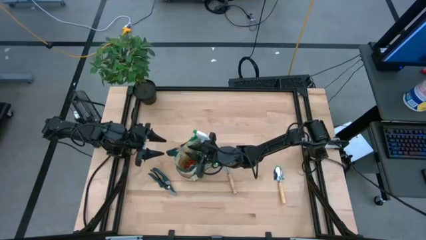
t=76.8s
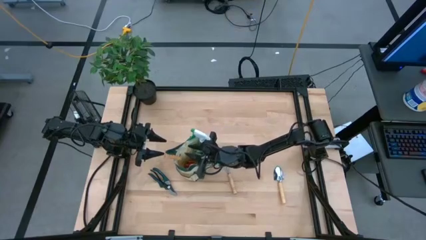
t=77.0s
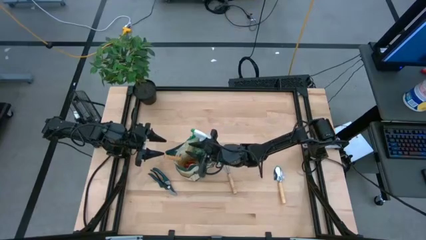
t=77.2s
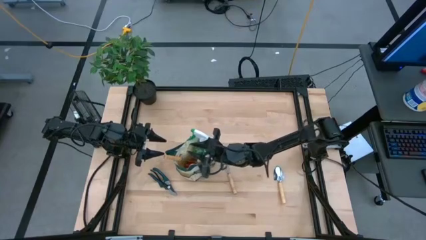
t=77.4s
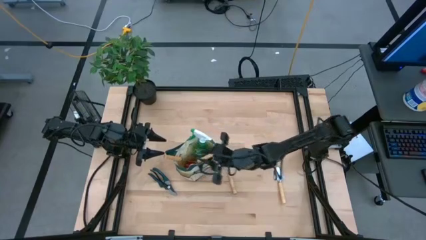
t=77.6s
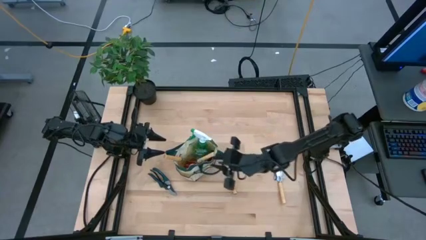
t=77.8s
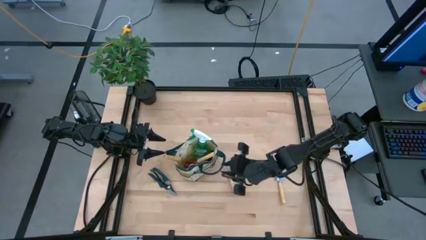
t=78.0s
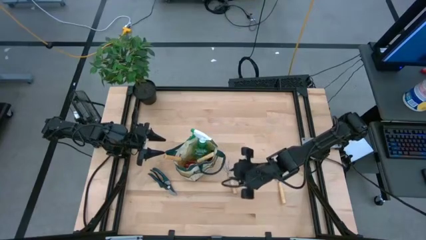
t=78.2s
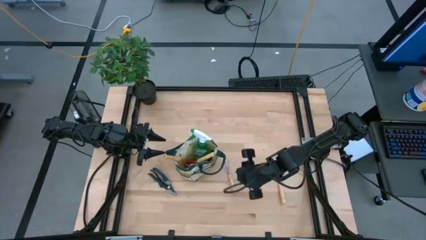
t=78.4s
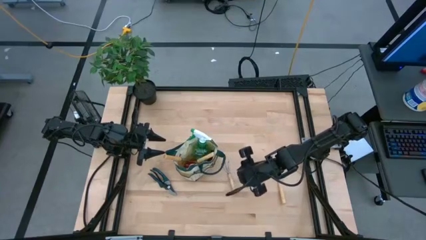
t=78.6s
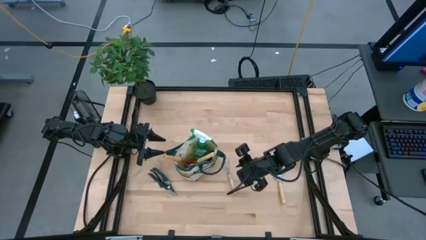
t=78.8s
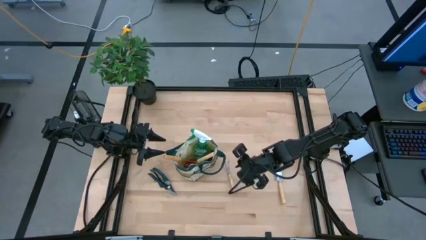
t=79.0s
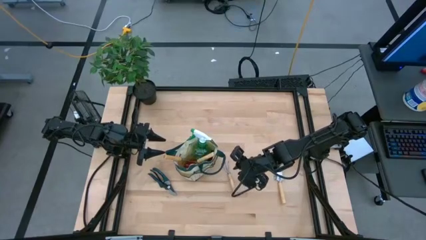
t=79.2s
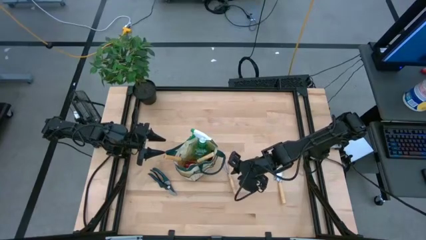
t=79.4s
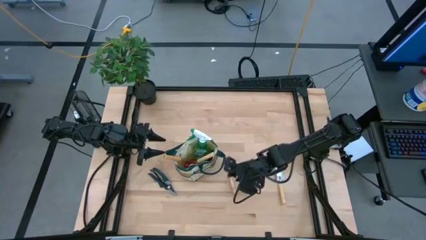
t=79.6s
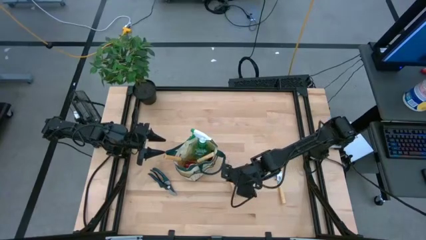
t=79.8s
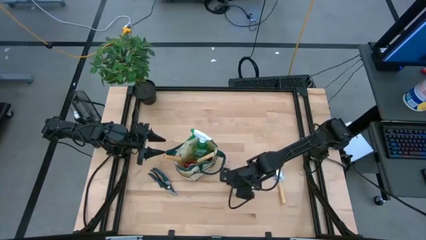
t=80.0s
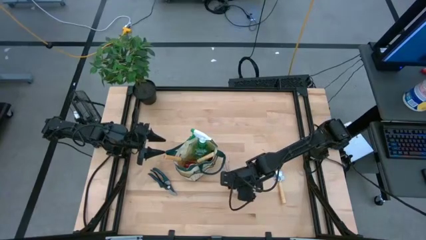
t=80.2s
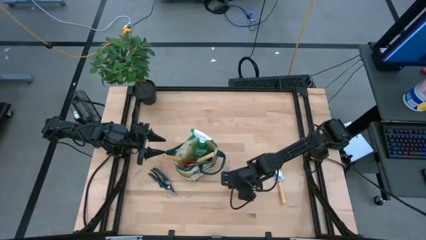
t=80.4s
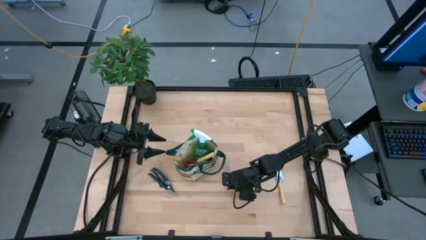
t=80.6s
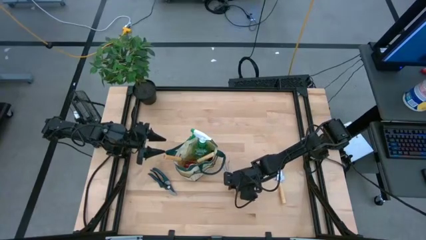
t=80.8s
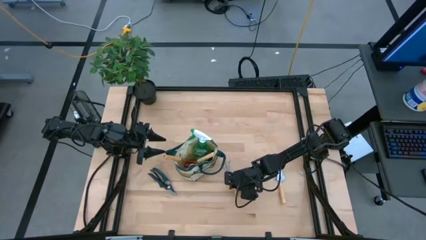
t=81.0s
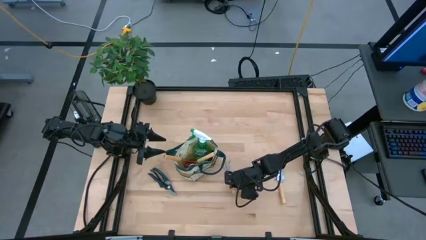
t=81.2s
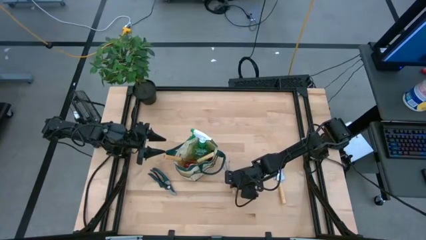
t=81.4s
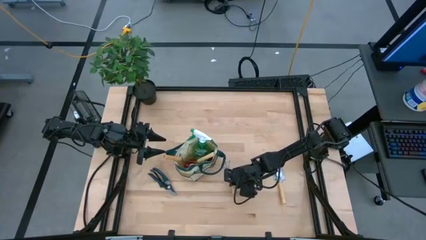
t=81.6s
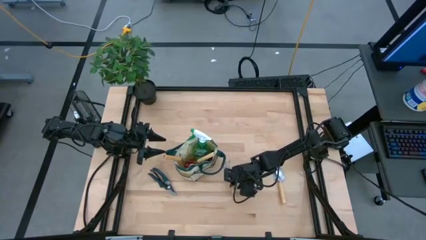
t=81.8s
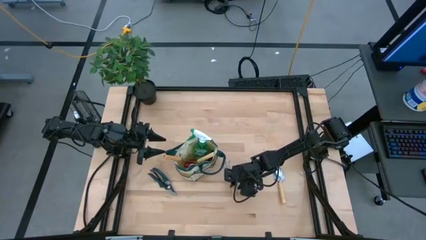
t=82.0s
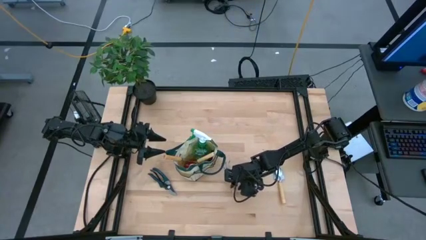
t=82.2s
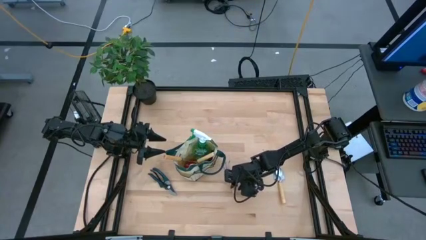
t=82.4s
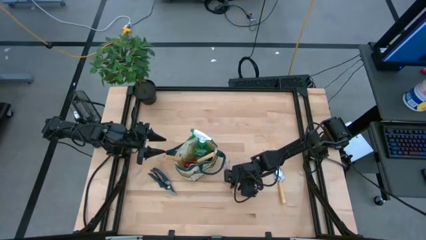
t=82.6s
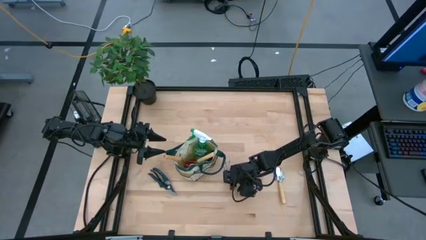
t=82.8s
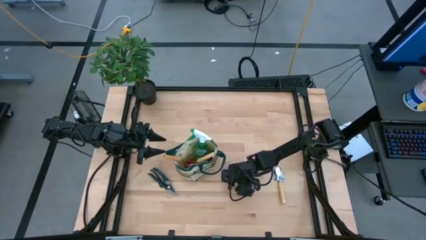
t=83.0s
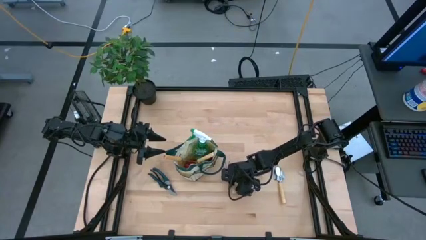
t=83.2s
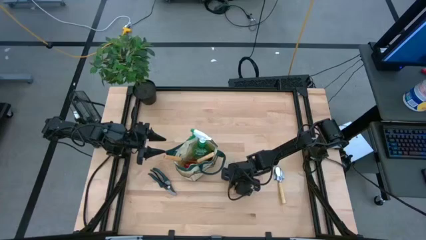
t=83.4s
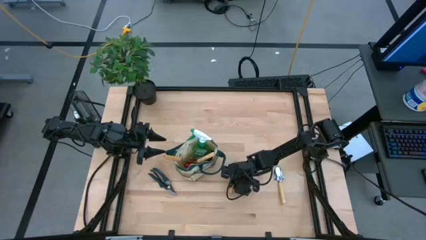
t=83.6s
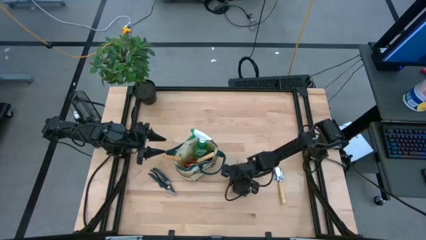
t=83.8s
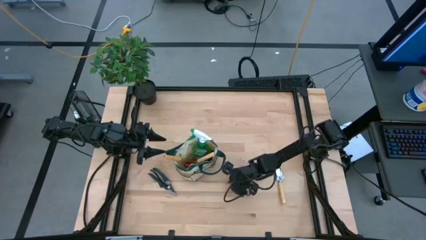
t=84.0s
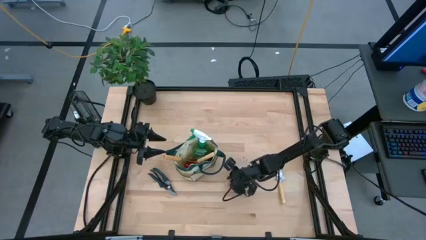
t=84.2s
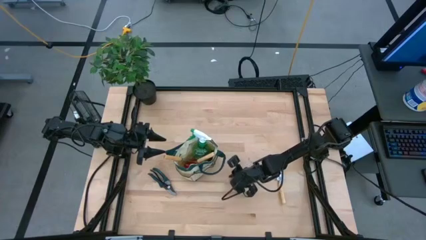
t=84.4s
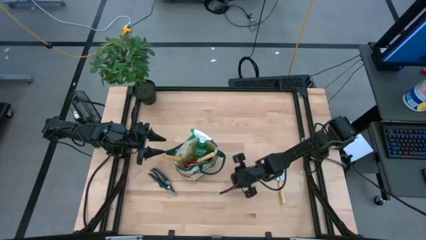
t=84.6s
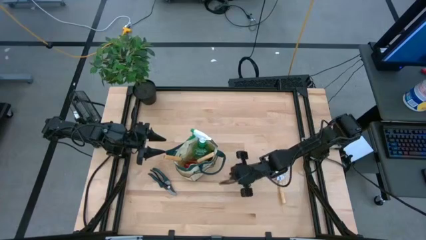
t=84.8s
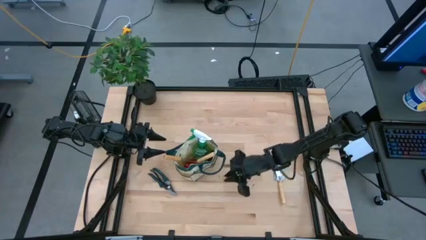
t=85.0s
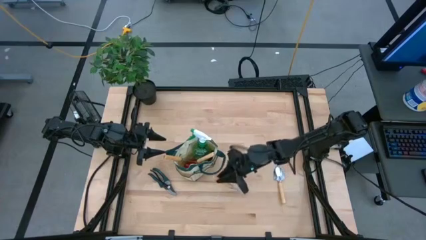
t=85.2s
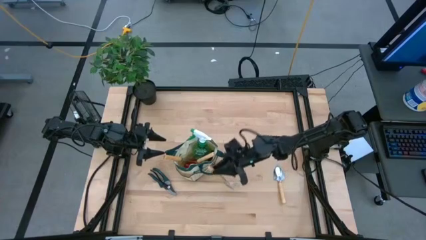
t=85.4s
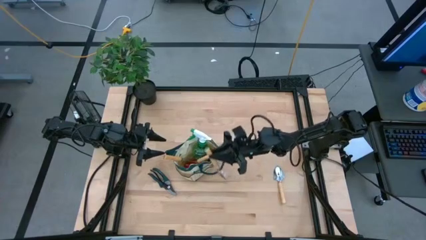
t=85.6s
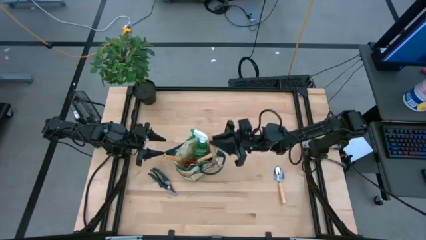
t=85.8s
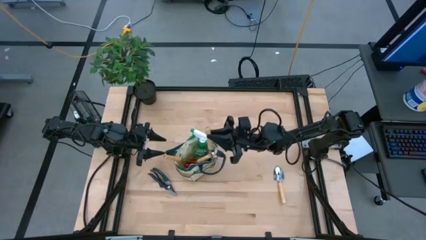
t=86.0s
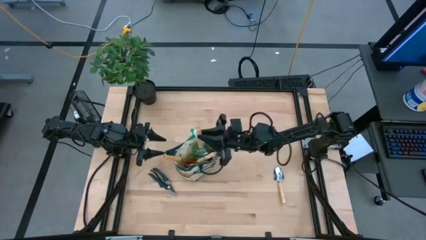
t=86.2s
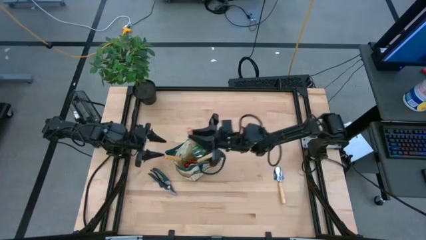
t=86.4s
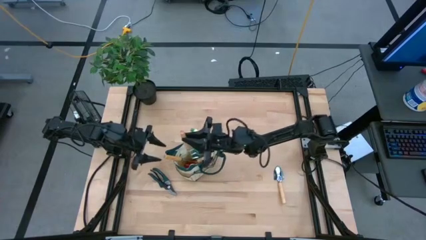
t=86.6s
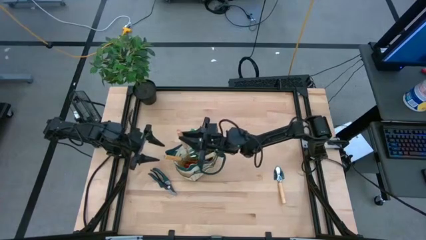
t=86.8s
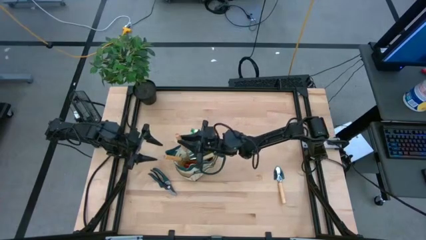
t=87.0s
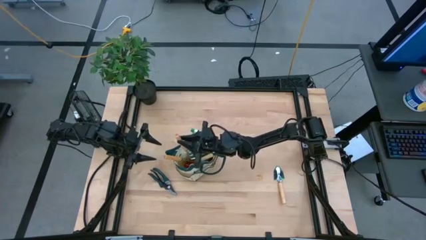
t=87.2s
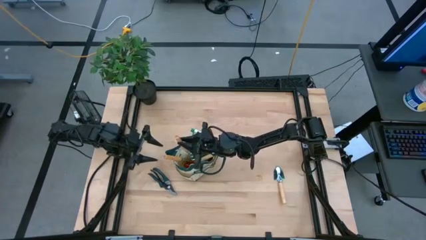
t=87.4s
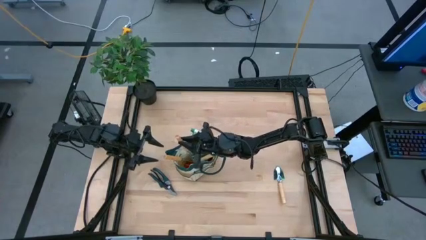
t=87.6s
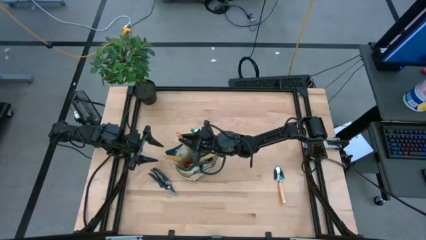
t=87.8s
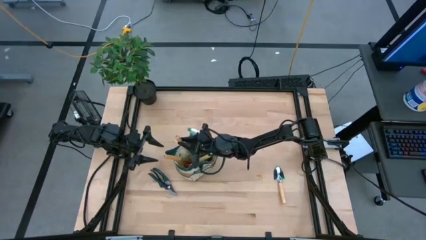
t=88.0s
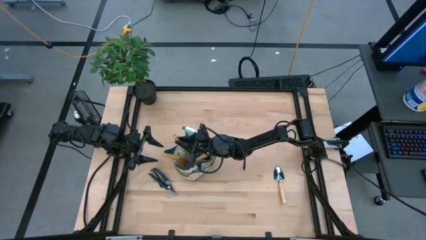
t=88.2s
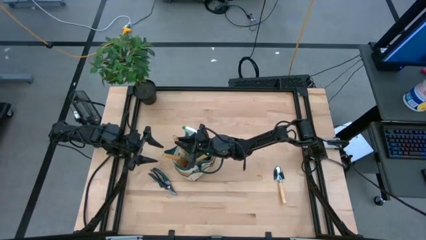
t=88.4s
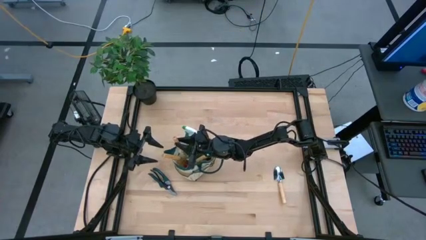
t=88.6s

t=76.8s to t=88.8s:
Task: Pick & Place Garden tools in Gardening bag
Put the brown hand rake into the brown bag

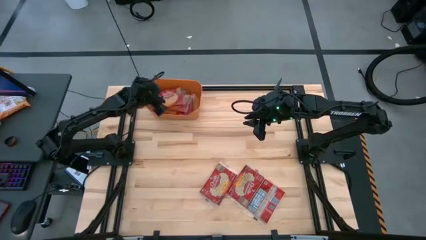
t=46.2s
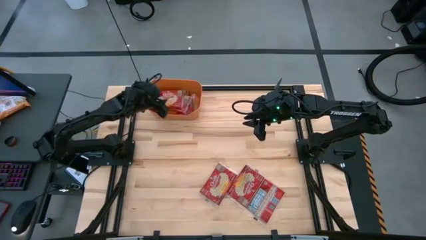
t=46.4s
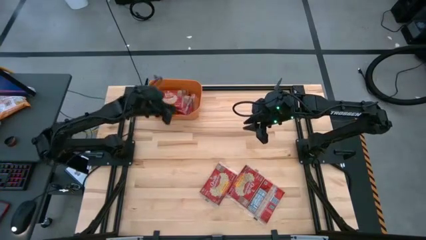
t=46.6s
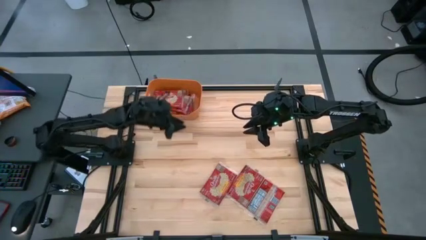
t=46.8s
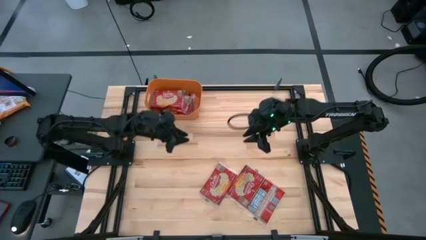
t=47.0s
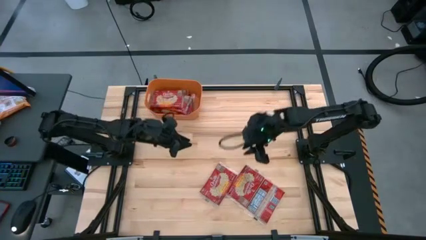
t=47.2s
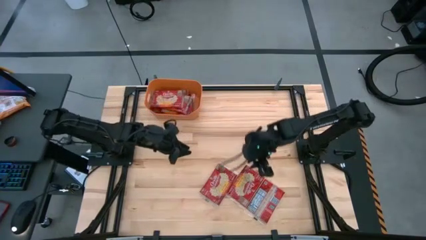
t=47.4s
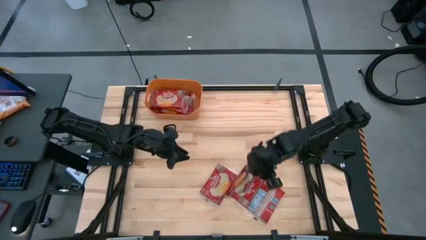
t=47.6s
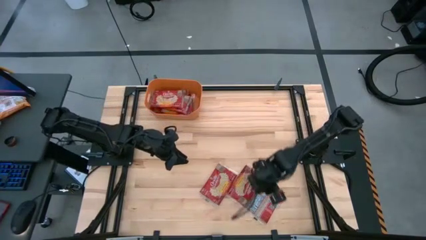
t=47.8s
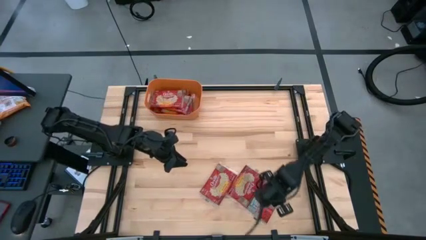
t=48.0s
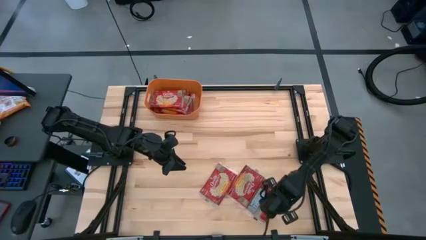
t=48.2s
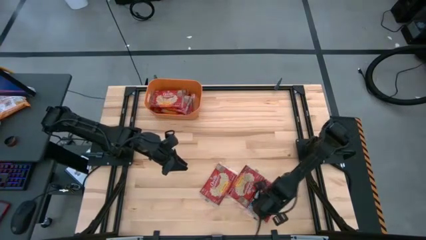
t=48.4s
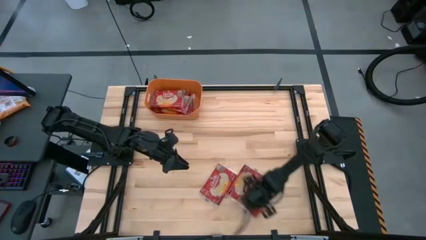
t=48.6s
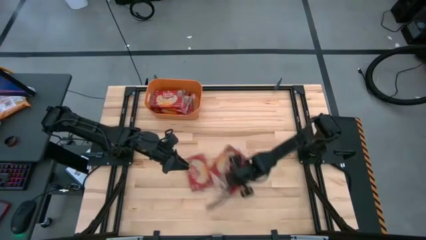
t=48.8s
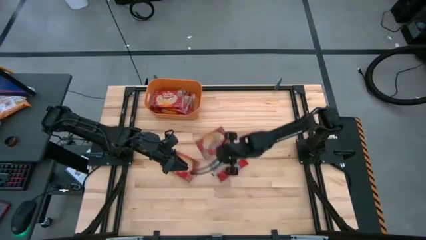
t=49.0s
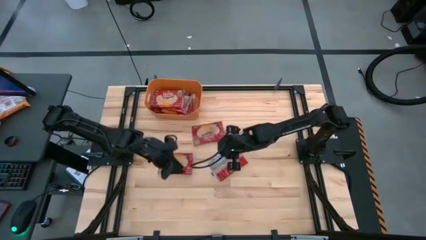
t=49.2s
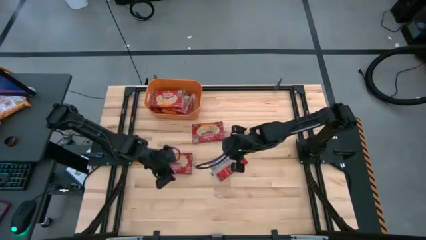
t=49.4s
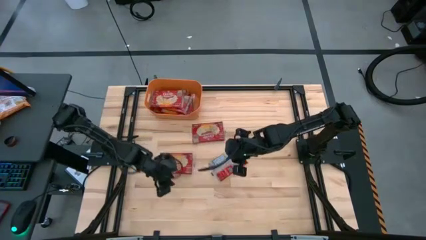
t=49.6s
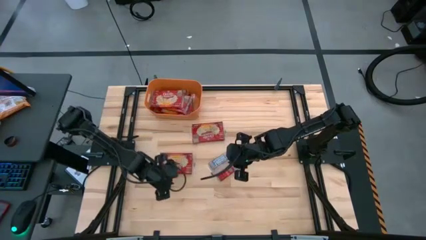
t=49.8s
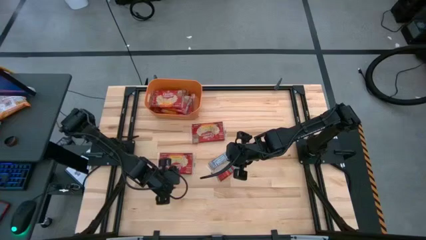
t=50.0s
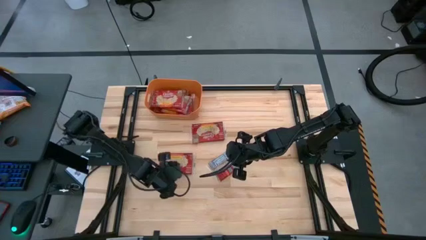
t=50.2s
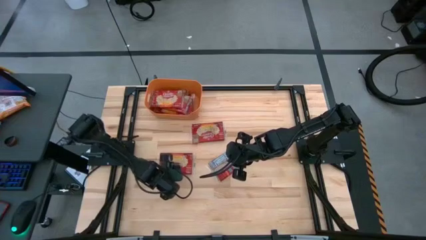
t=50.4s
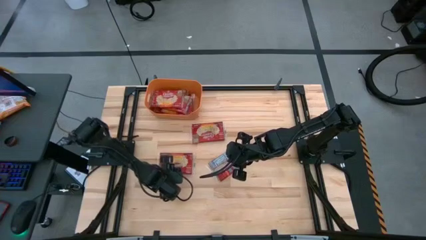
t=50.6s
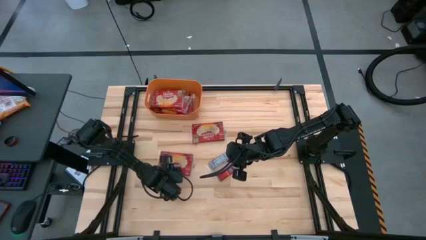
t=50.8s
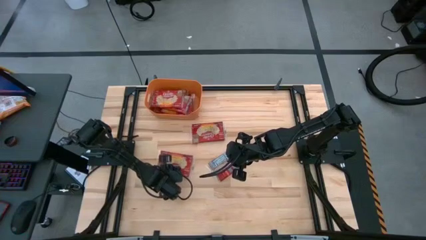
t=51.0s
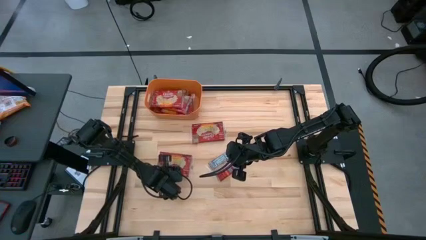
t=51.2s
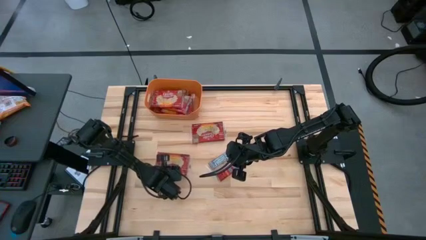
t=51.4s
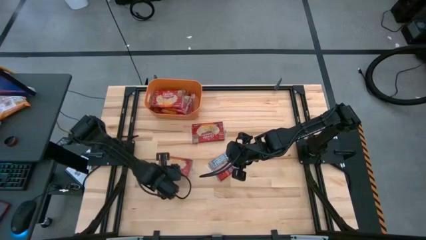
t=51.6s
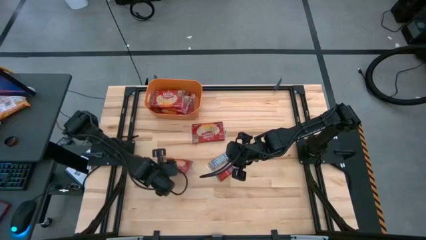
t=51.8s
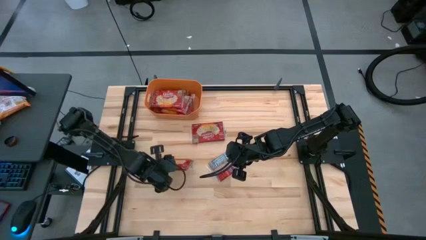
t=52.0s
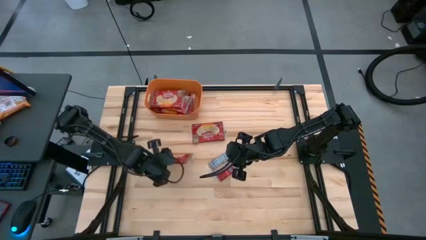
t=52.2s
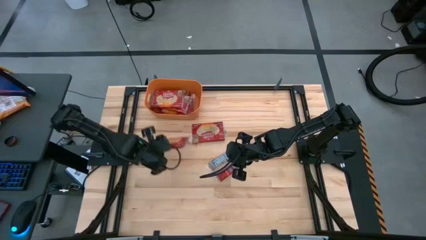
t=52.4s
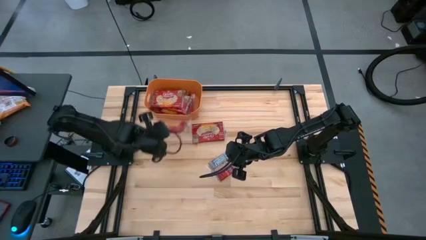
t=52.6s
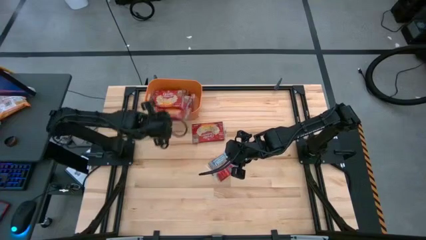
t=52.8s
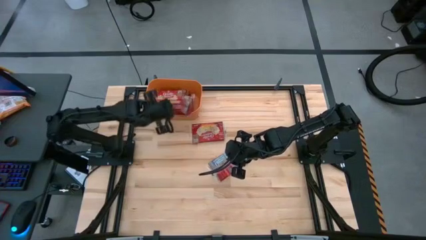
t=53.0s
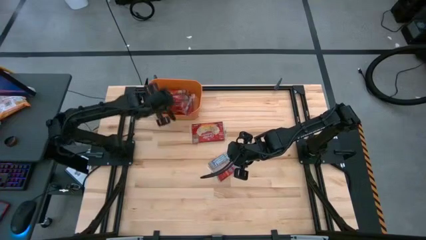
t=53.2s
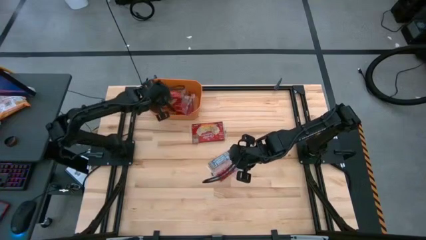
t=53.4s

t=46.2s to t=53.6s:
Task: Sort popcorn bags into baskets
Put the red popcorn bag into the orange bin
